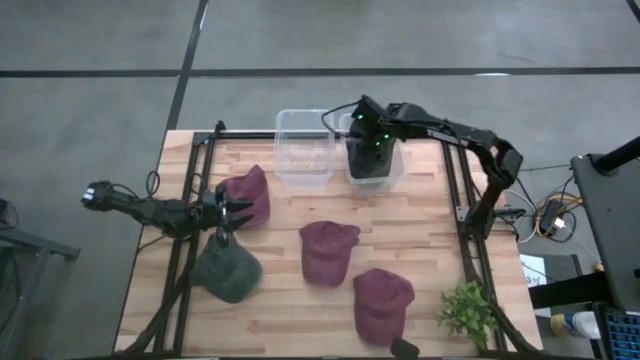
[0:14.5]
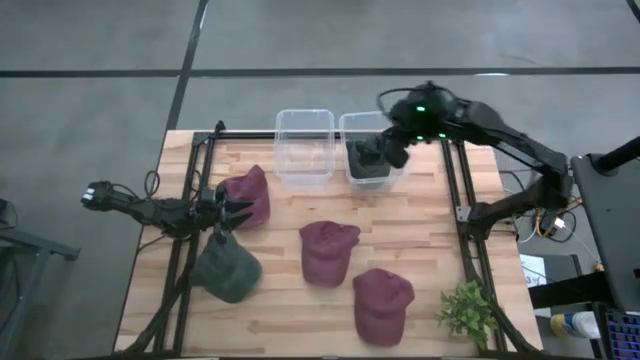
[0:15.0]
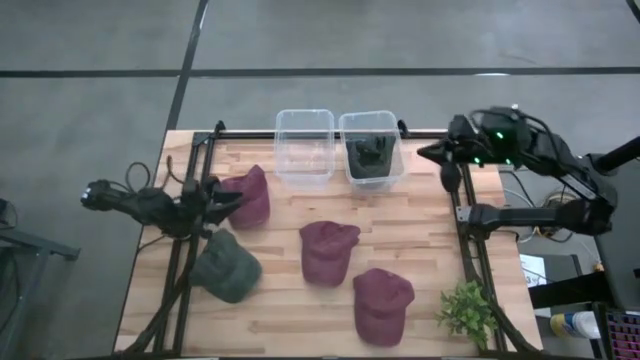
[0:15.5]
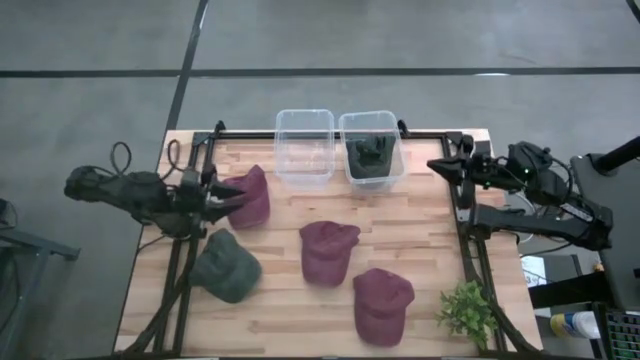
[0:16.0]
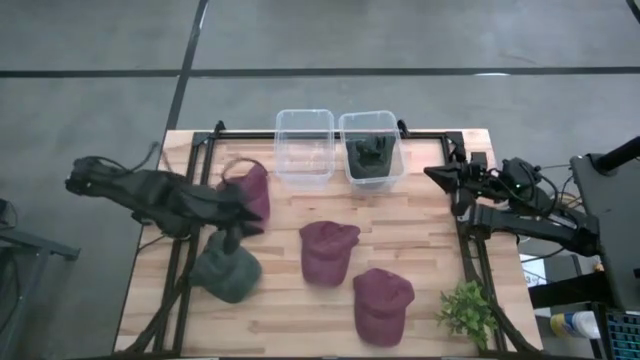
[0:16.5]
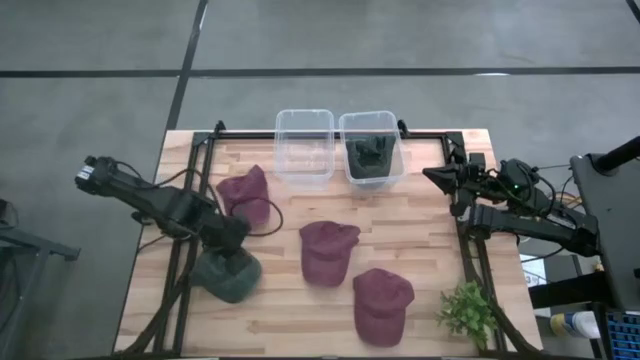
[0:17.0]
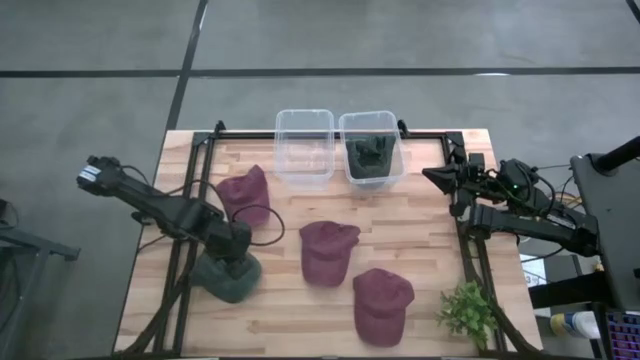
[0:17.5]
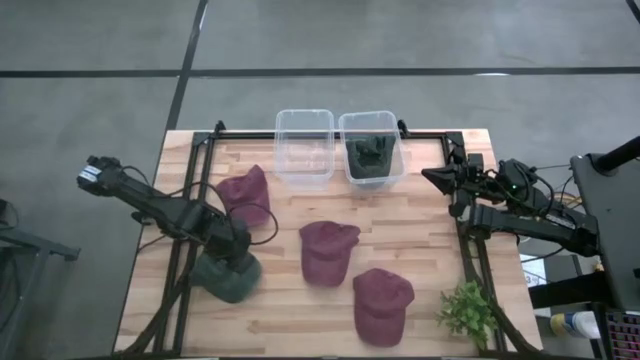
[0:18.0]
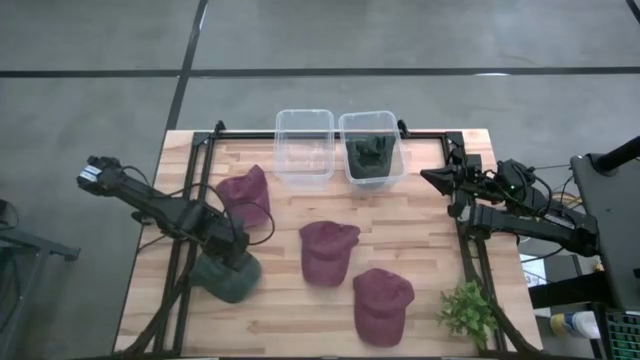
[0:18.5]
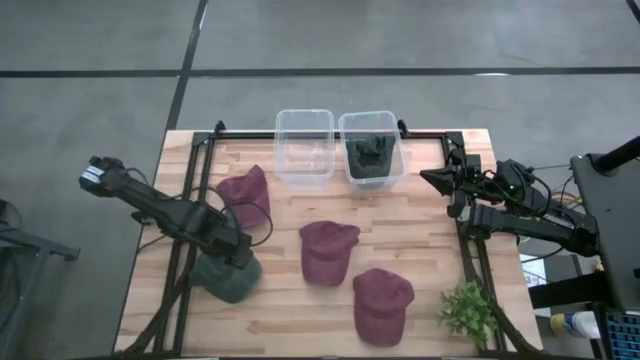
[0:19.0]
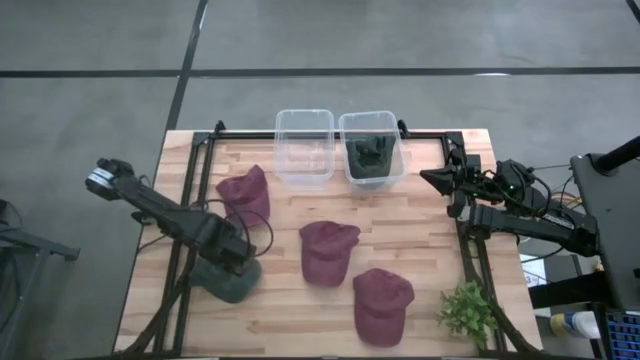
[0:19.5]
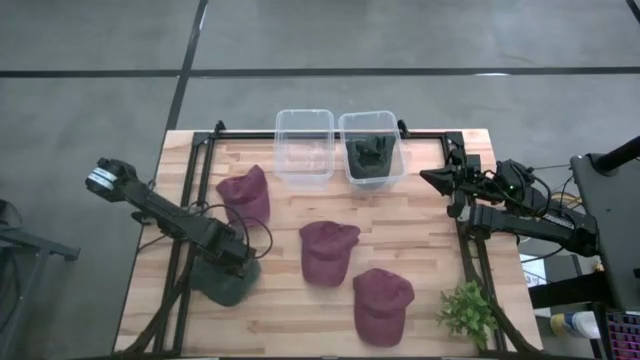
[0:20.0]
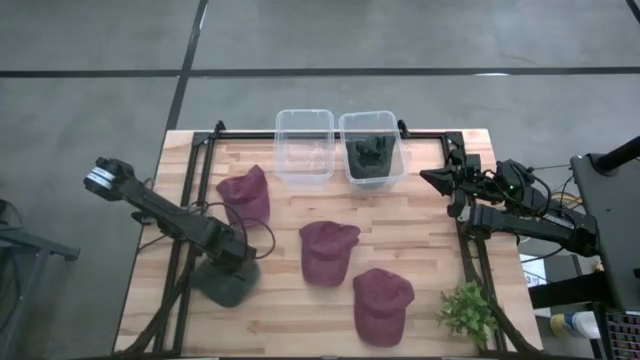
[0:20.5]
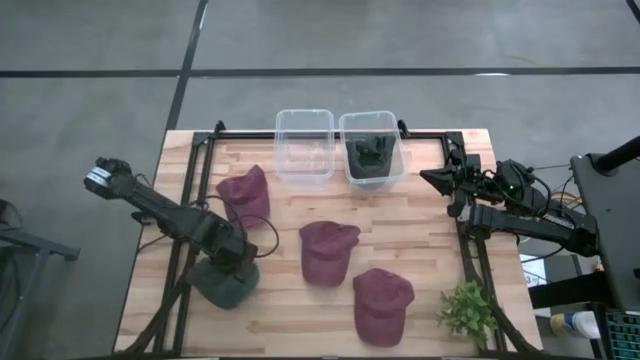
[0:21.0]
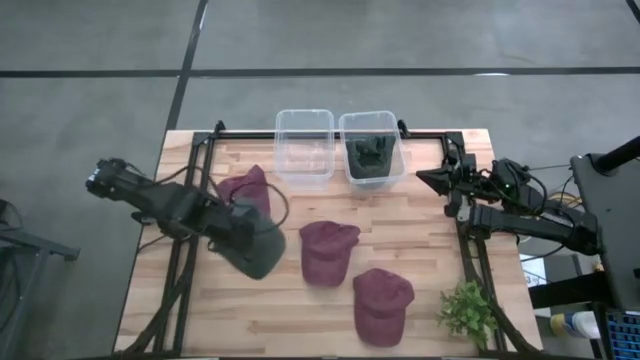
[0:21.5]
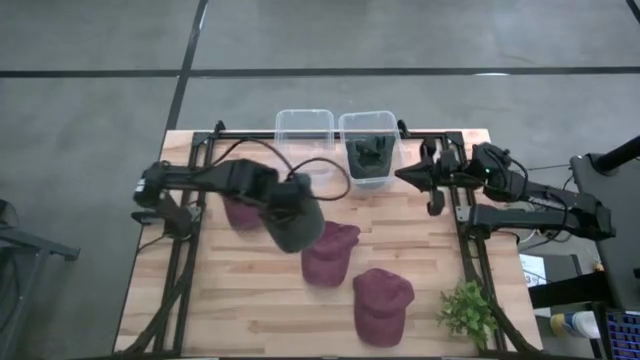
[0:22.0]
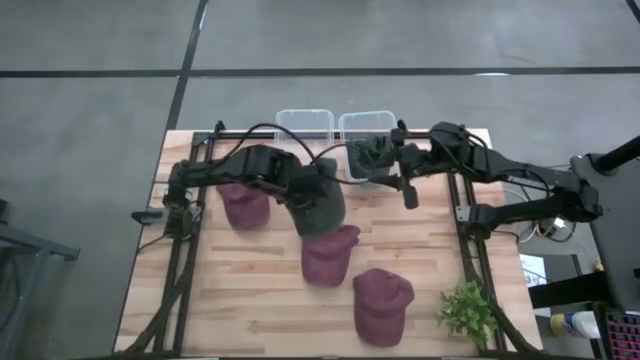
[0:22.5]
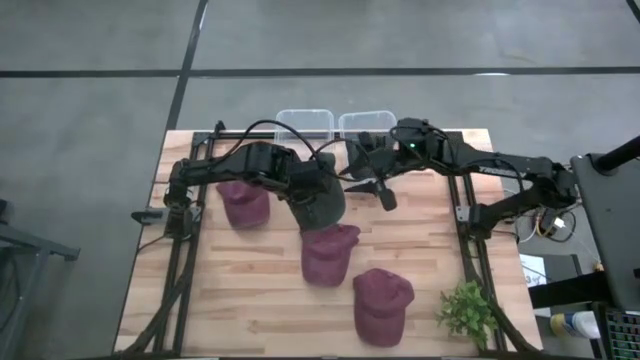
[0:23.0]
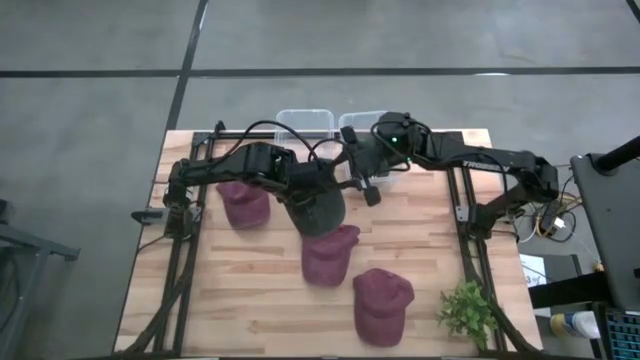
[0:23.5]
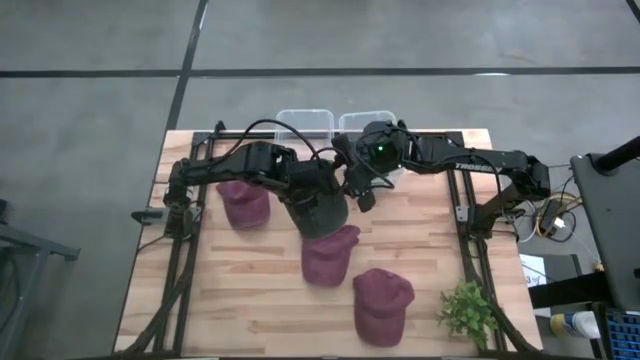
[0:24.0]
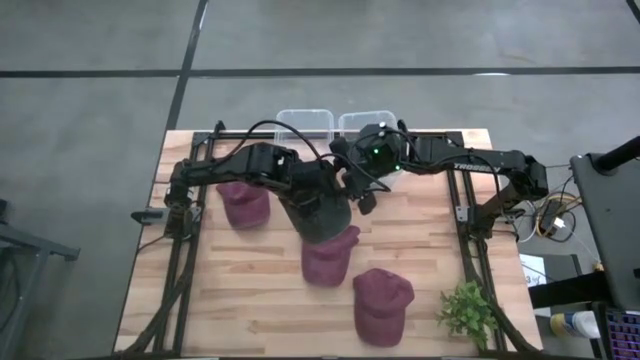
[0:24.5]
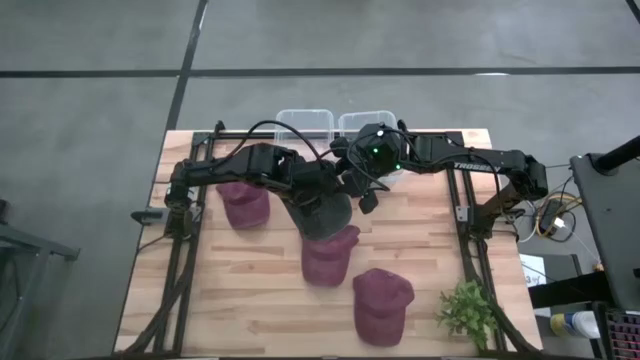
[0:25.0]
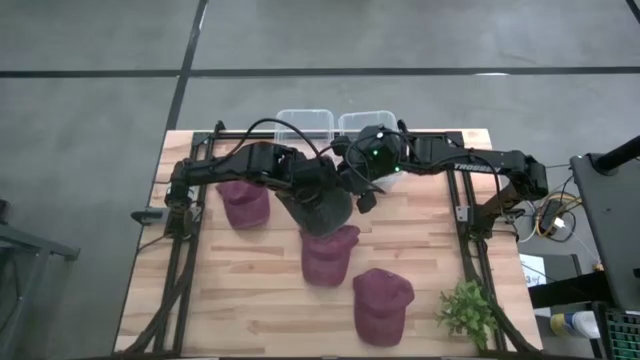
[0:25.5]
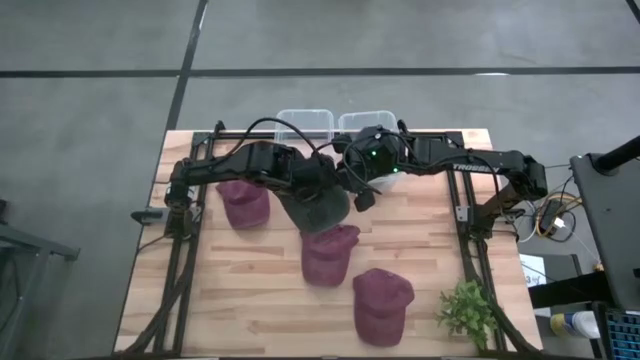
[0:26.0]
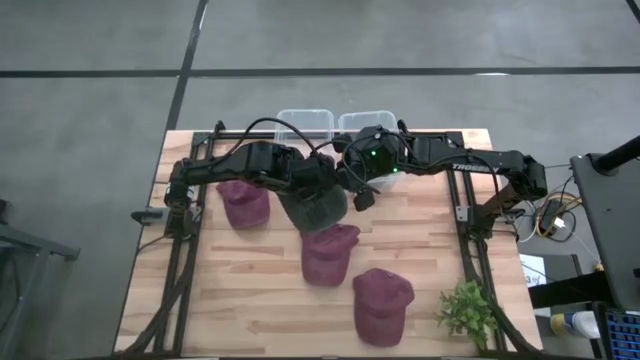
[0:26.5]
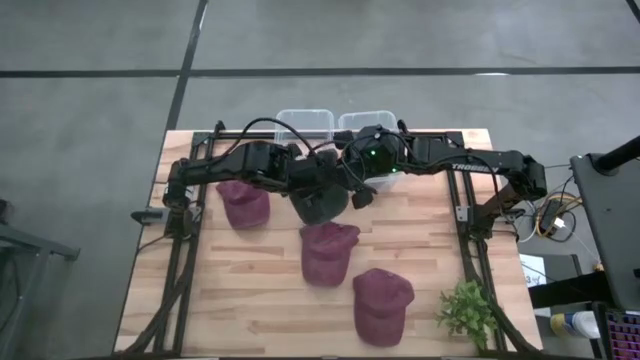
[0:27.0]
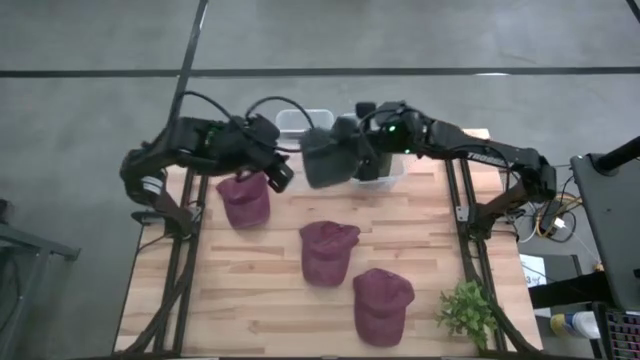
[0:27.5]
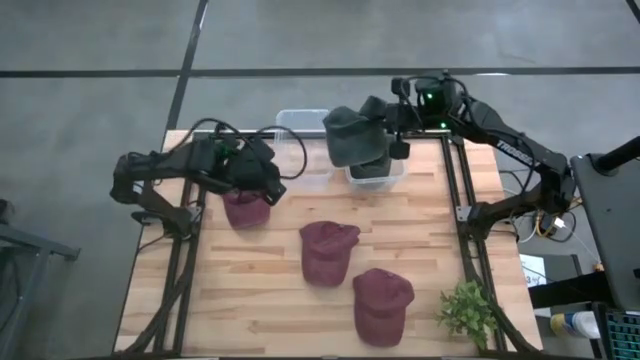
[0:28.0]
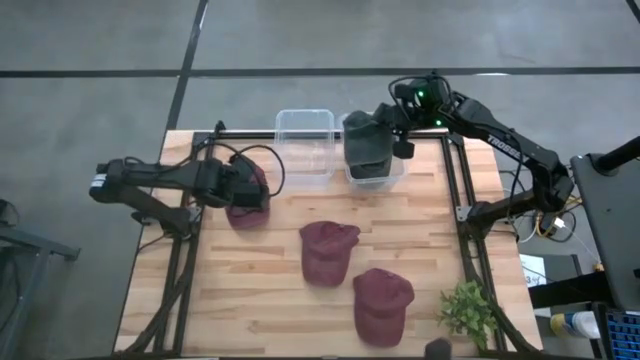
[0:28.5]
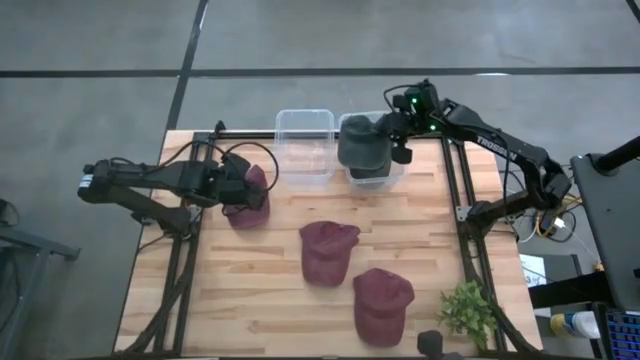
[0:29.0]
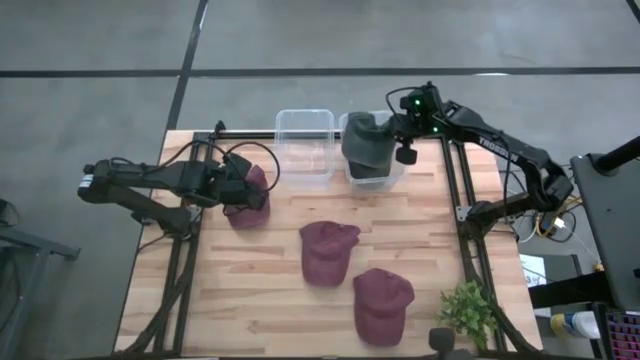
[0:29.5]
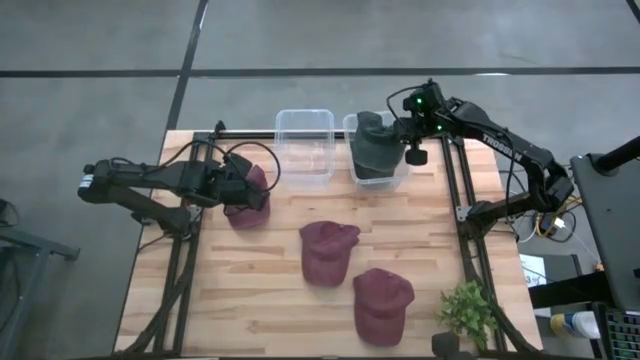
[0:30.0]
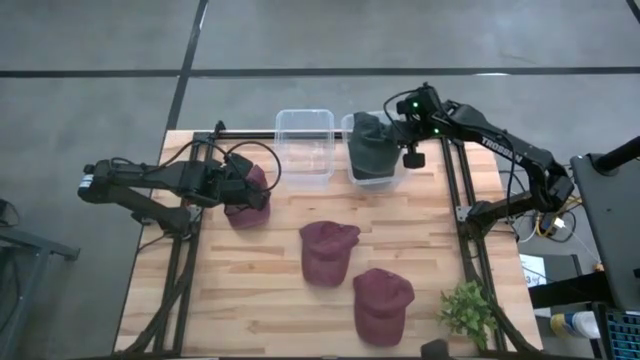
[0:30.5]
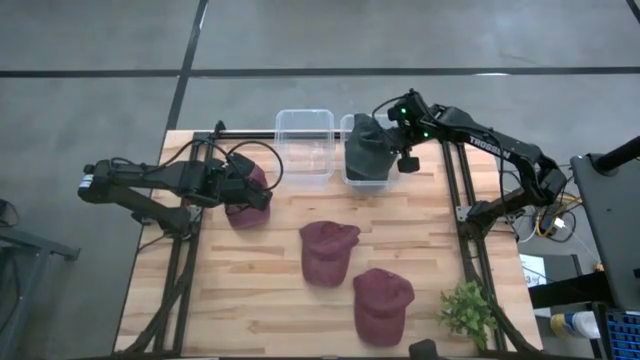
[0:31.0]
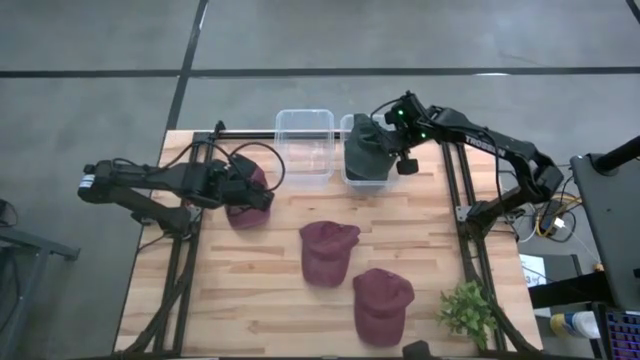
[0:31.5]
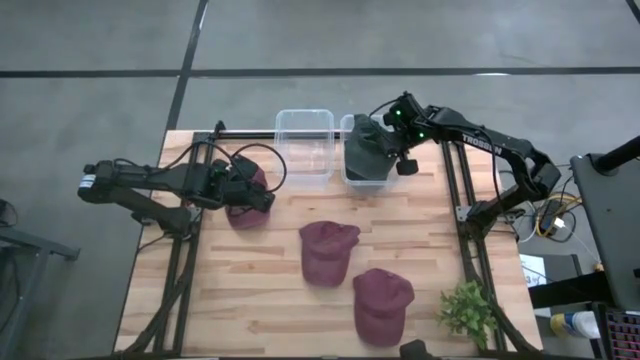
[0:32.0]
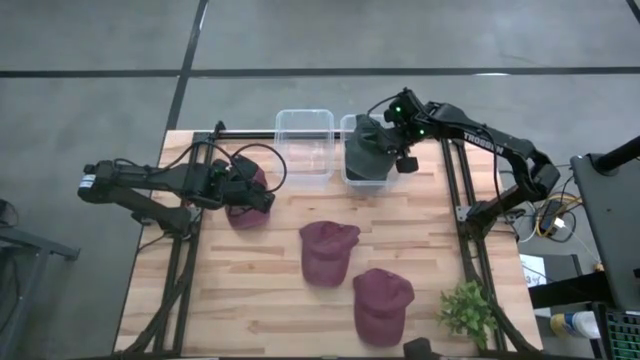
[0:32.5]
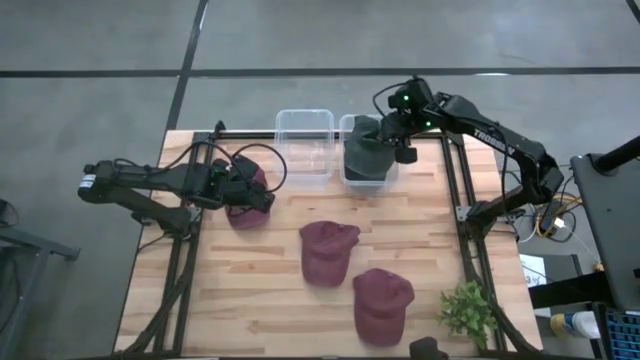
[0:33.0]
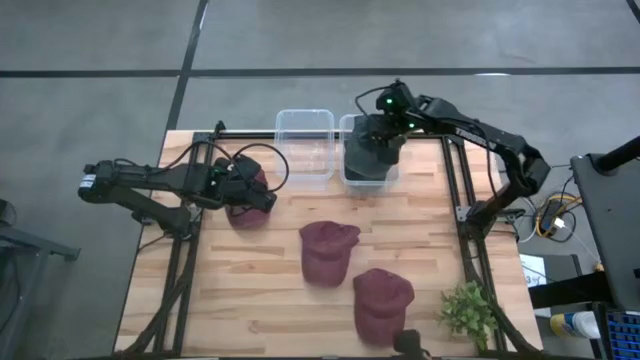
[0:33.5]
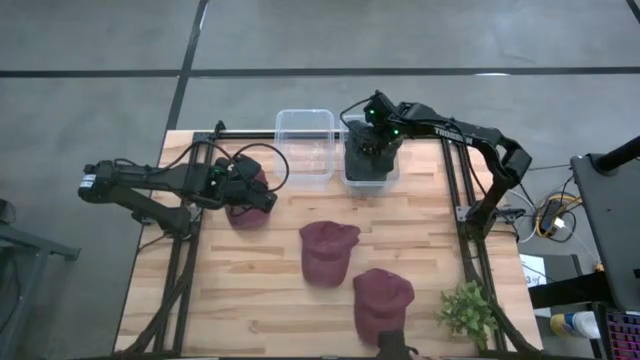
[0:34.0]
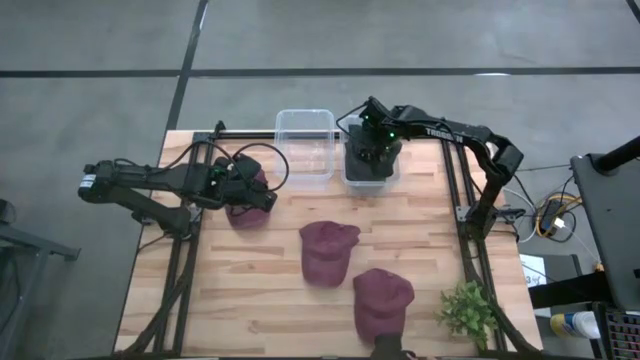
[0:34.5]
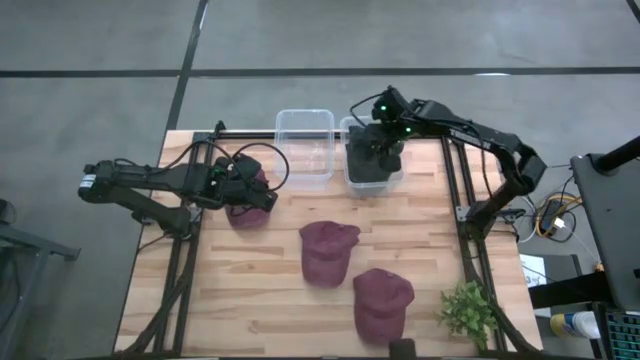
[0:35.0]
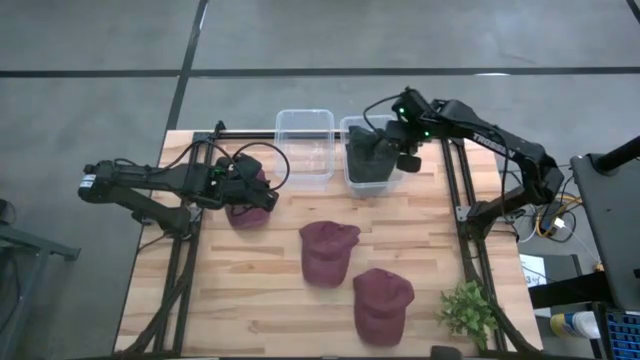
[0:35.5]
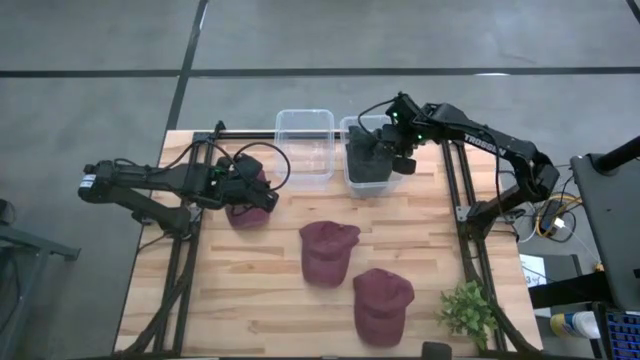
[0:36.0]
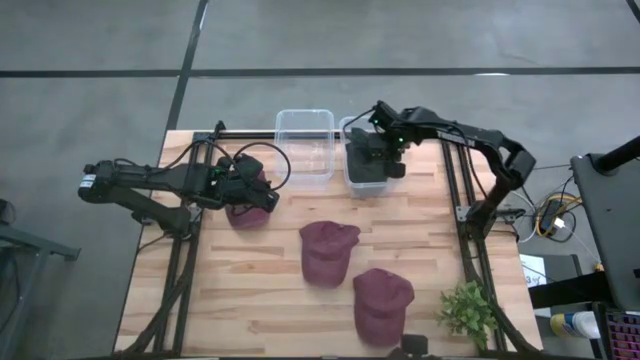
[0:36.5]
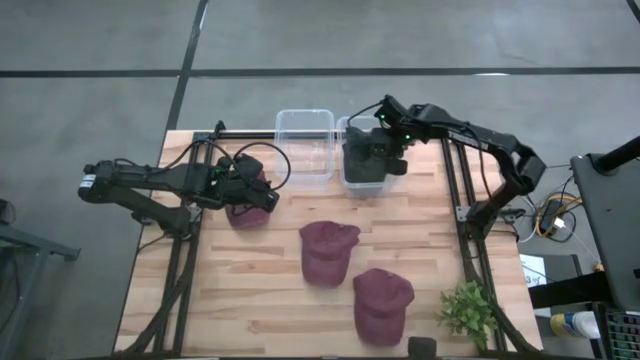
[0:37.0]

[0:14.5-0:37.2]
Task: Pick & Place hat
Put the black cap into the right transparent bin
